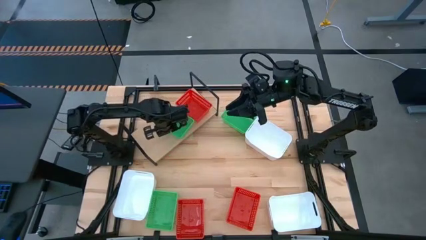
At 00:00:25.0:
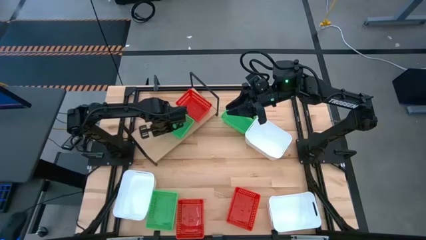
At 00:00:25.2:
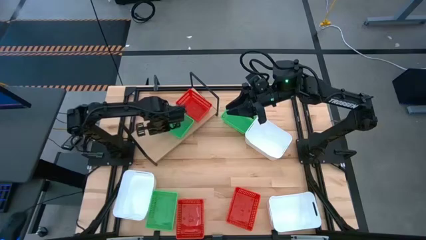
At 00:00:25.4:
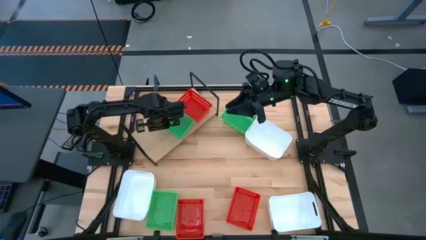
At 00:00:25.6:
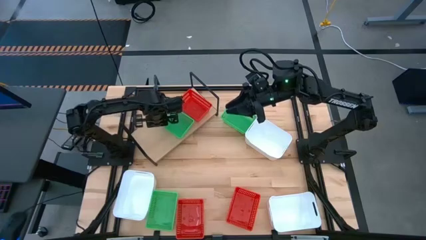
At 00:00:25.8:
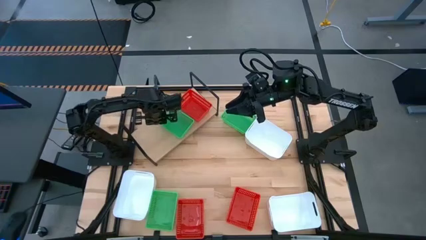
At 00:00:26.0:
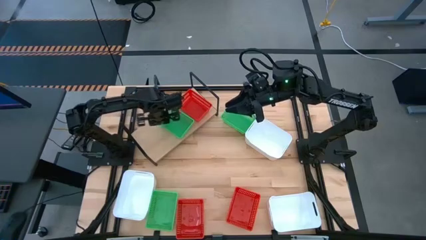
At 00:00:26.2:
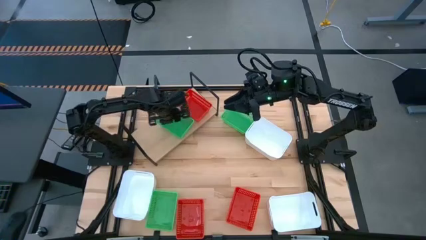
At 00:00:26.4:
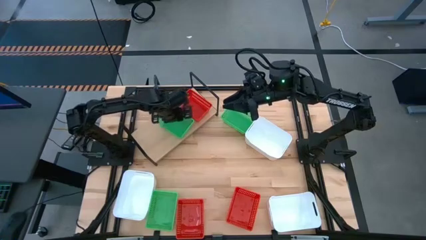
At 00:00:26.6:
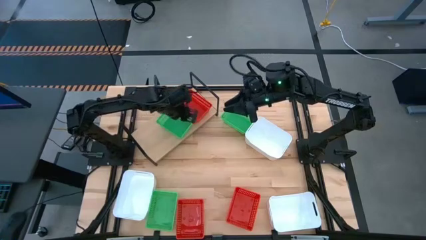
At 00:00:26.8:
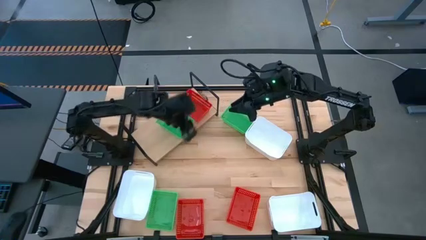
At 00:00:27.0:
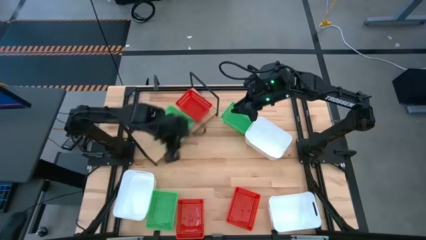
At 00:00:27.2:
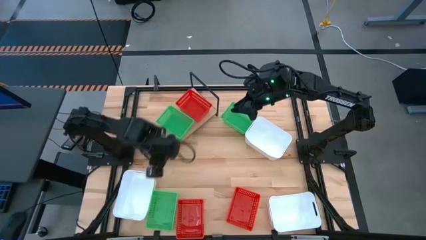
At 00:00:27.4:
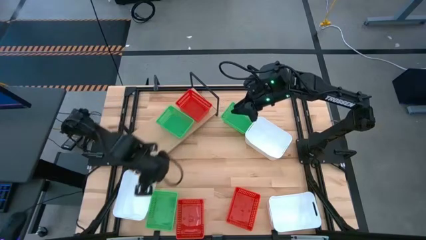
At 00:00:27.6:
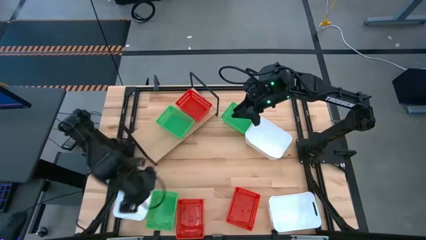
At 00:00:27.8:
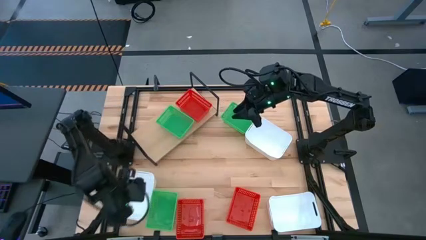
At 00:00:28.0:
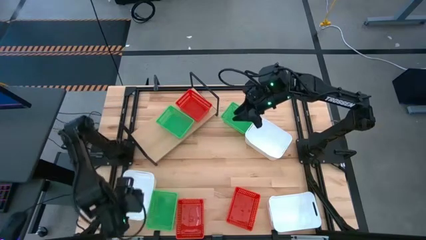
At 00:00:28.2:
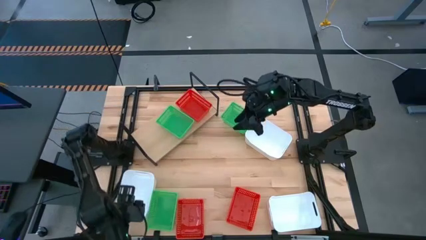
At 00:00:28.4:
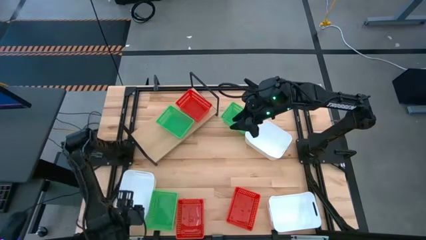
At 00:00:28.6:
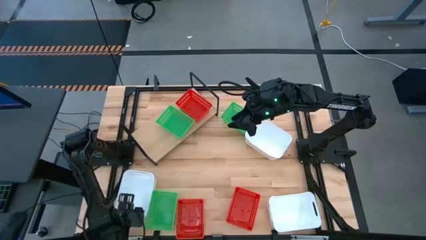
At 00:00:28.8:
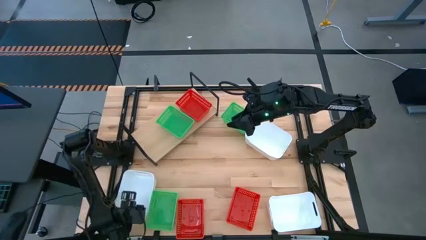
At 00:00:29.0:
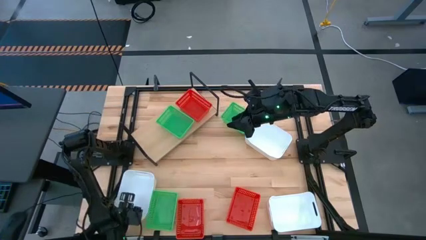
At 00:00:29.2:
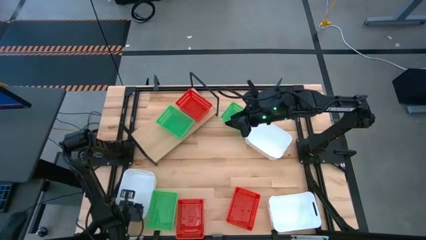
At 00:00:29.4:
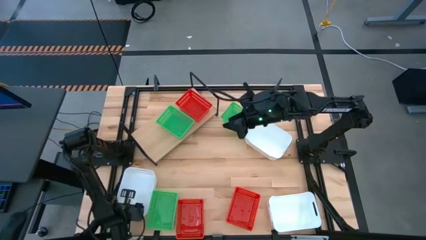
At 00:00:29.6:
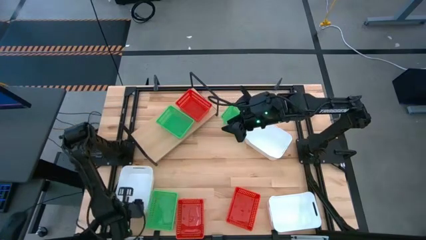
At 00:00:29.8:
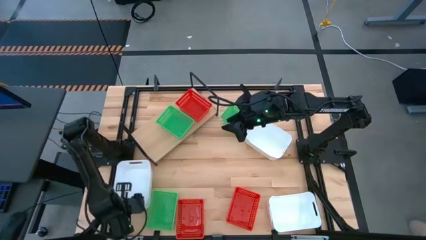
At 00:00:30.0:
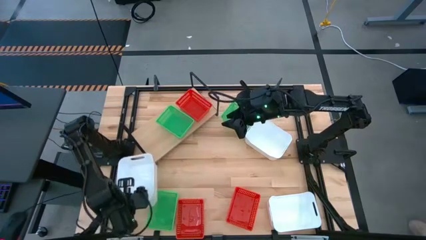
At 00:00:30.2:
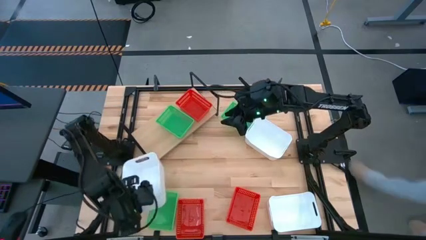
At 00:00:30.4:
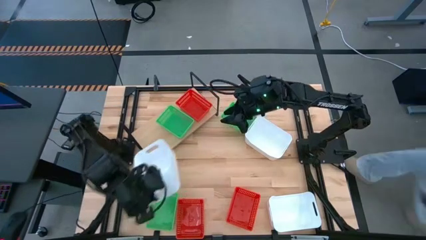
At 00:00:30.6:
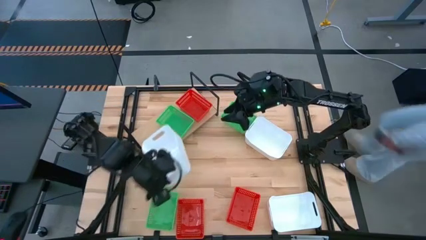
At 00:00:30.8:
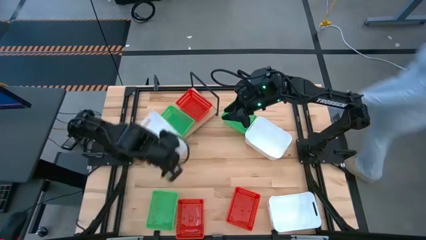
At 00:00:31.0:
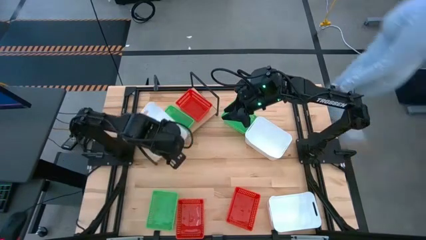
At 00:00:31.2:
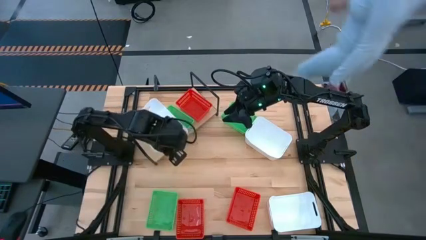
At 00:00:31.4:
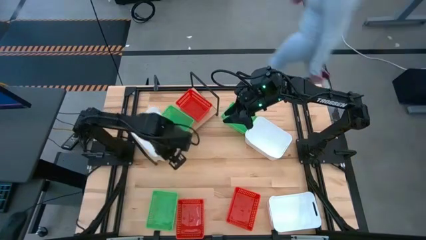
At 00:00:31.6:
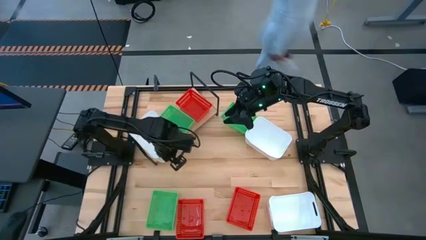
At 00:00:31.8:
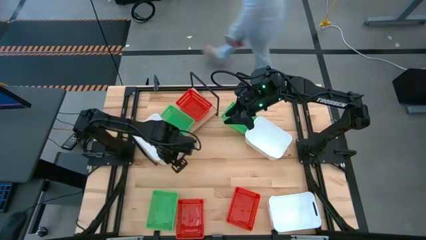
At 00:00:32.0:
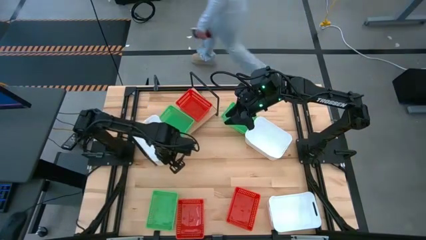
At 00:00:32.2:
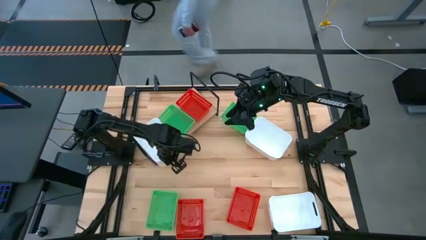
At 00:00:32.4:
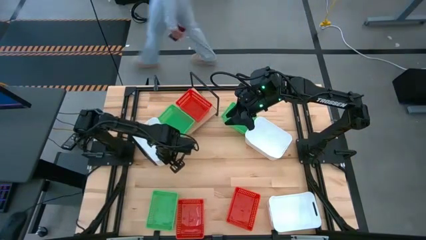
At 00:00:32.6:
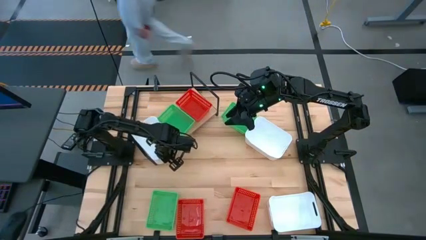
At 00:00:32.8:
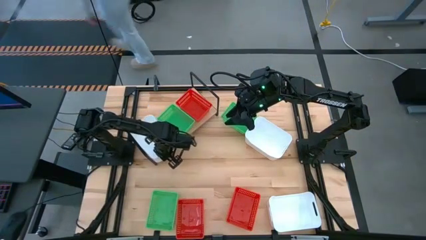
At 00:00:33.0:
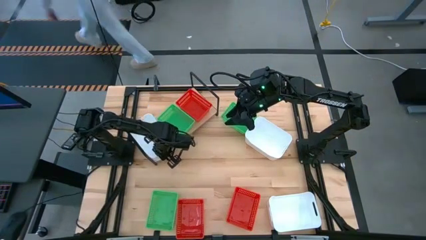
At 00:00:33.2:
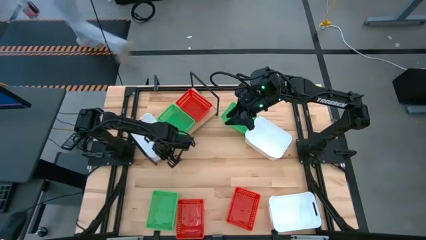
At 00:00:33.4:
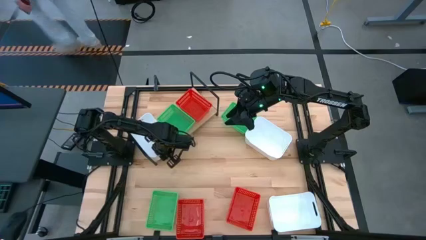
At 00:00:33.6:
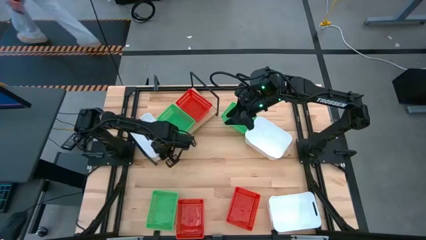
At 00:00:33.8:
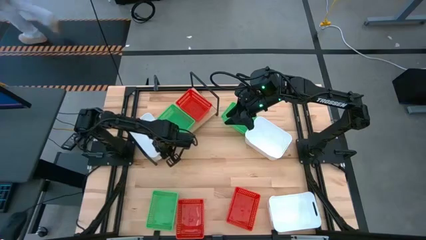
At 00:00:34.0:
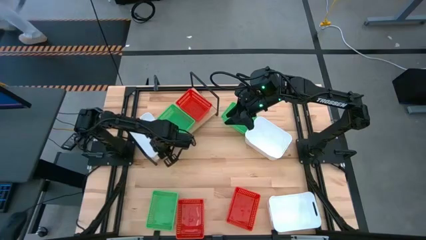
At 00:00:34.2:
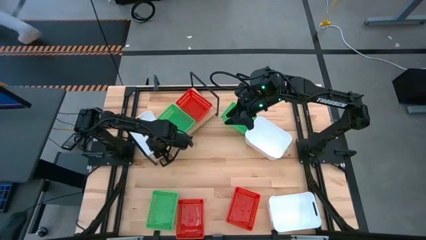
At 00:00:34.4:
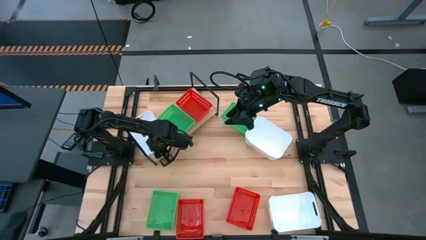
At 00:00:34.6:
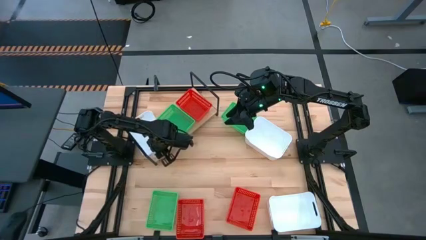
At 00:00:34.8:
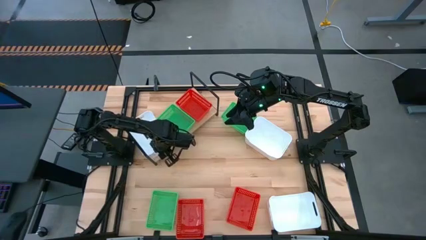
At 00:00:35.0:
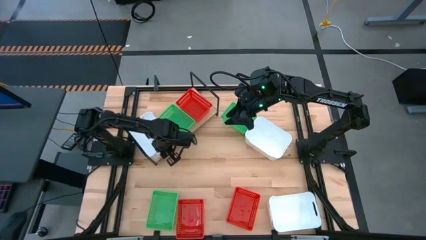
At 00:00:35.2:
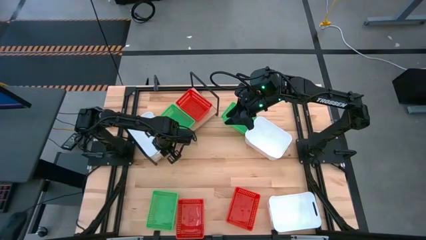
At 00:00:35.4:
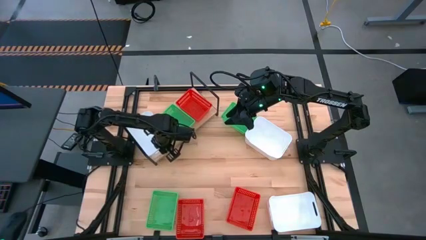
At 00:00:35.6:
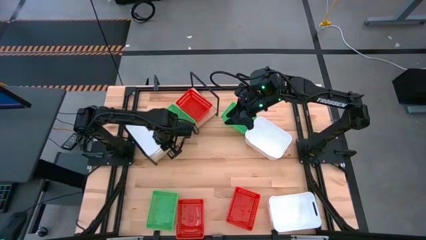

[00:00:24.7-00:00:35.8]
Task: Stack baskets on shelf by color
Put the bottom left white bin on the shelf

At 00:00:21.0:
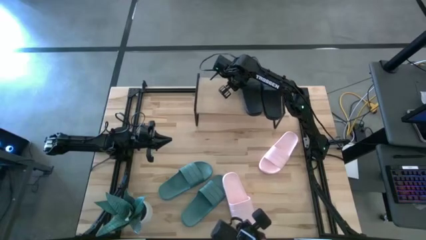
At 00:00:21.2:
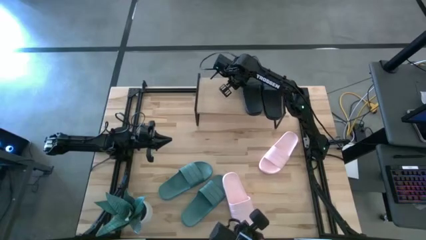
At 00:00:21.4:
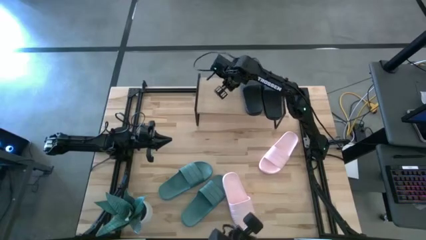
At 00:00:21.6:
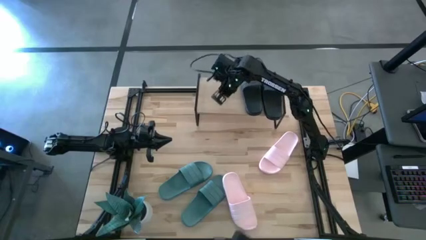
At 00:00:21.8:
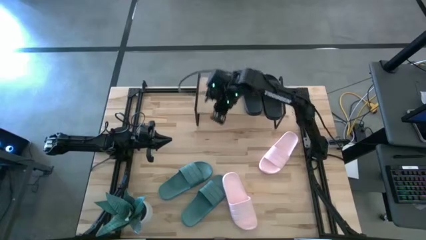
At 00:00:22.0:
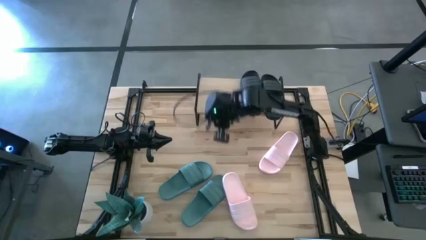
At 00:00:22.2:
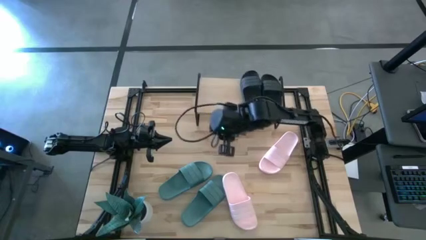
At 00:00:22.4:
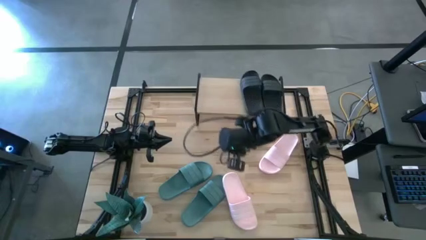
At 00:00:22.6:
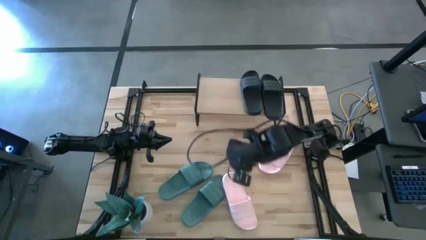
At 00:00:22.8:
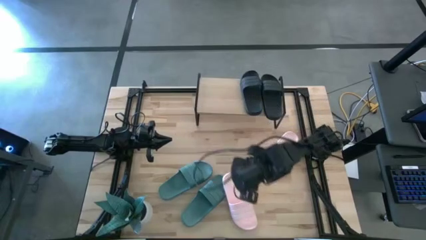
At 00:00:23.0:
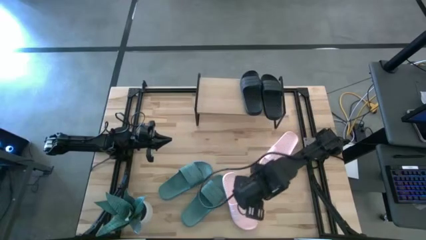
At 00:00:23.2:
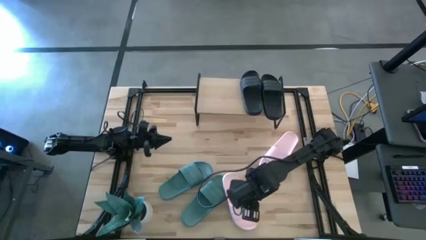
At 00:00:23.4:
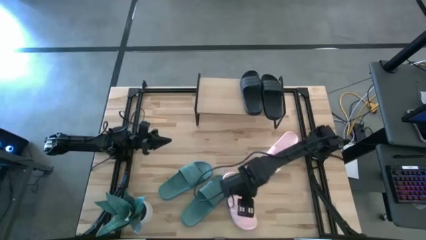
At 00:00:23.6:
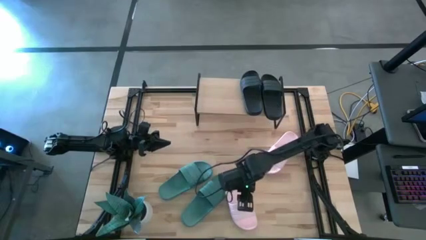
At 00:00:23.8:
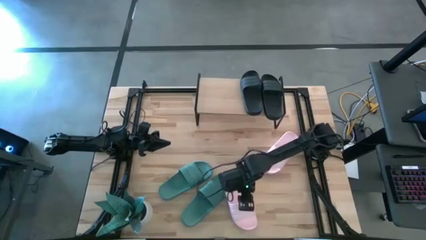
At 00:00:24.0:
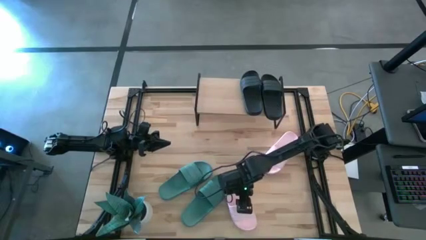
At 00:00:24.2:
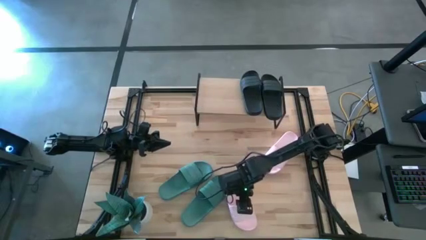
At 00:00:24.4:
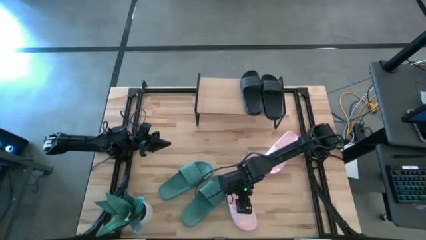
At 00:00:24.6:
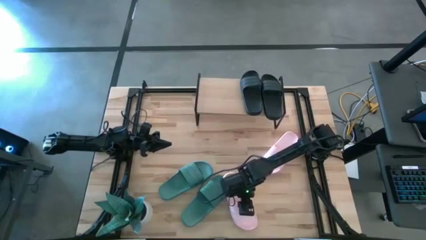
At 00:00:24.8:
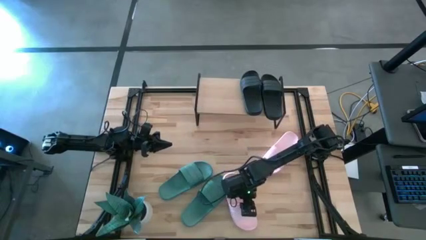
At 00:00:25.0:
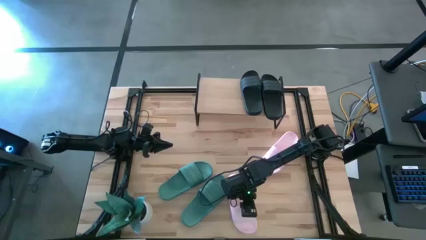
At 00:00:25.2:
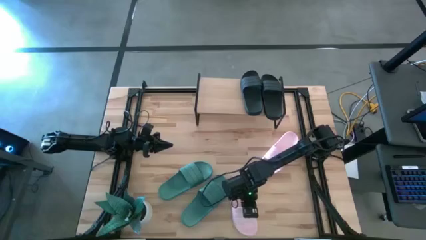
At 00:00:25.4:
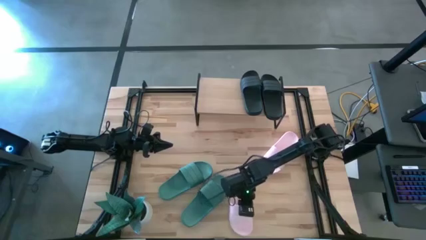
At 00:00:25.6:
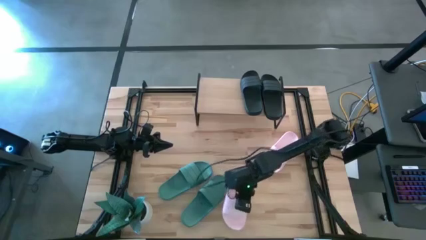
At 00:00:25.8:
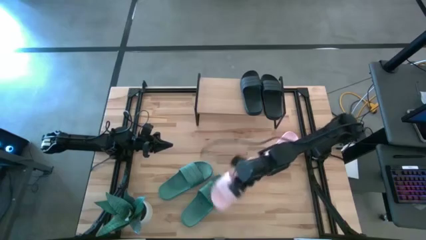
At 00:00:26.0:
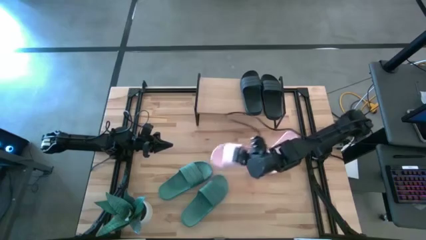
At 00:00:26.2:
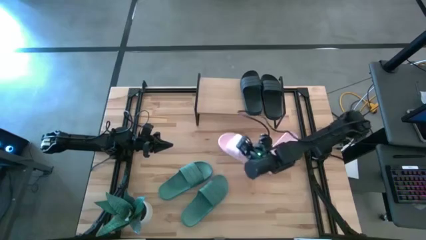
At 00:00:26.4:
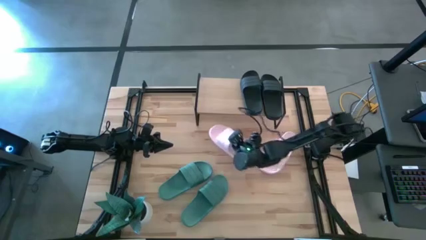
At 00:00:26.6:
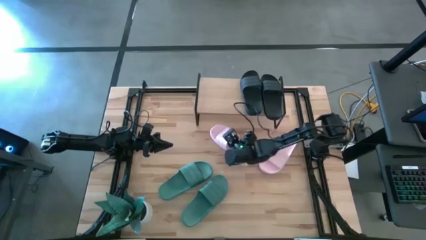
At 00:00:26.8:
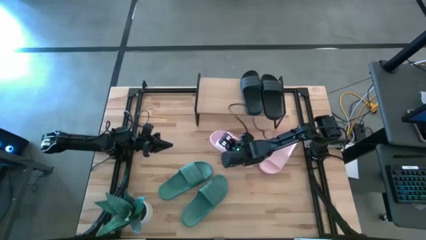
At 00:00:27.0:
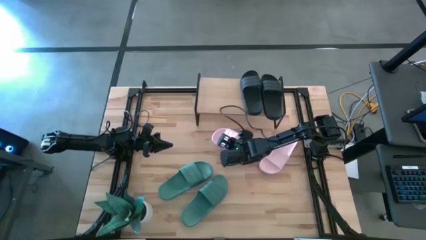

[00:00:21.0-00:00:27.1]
Task: Pick and place slides into the shelf
Move the bottom pink slipper to the center of the table
